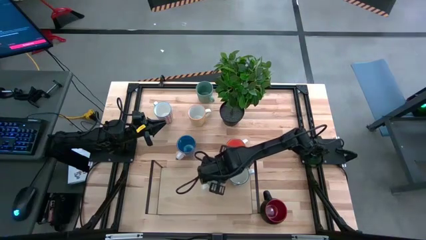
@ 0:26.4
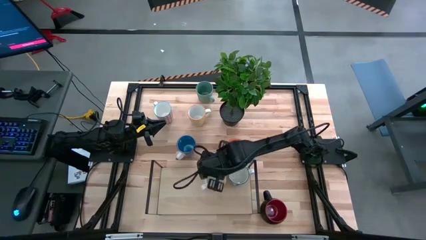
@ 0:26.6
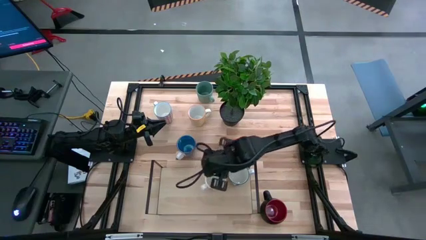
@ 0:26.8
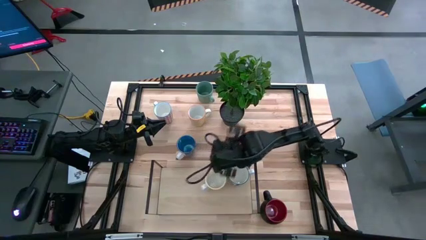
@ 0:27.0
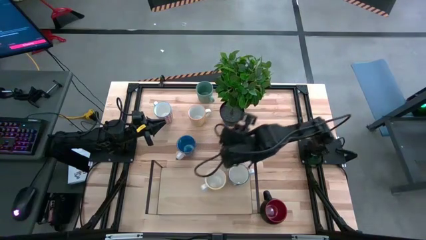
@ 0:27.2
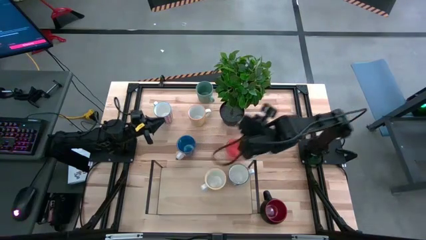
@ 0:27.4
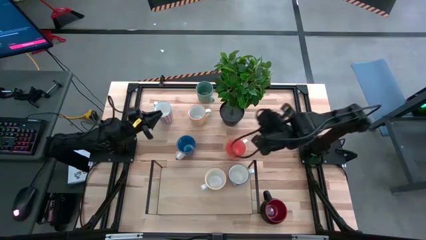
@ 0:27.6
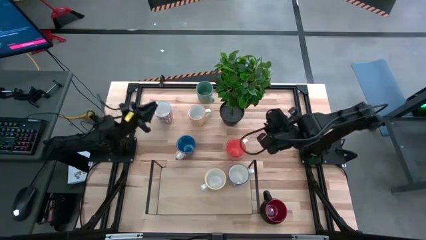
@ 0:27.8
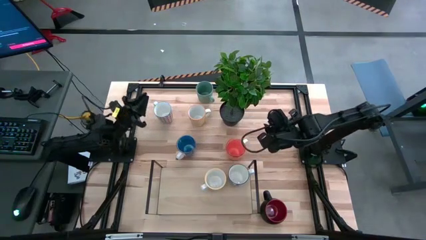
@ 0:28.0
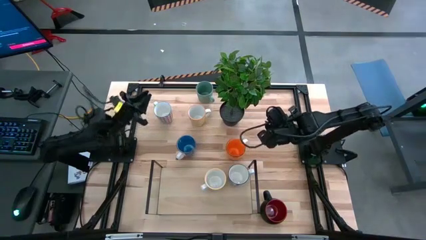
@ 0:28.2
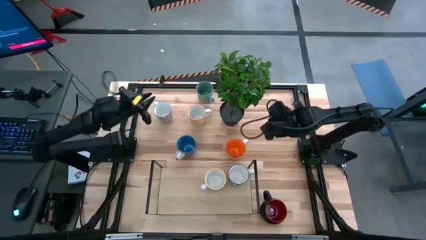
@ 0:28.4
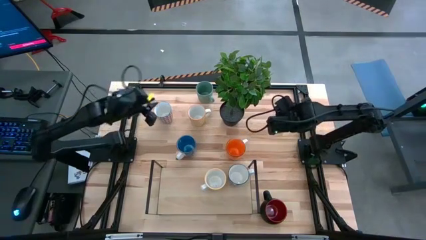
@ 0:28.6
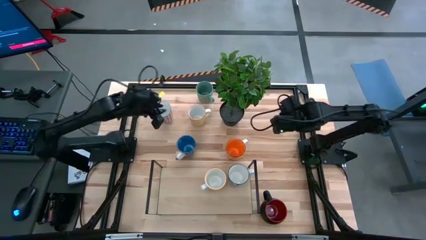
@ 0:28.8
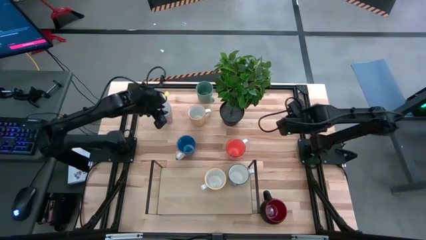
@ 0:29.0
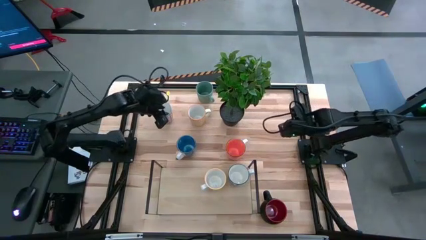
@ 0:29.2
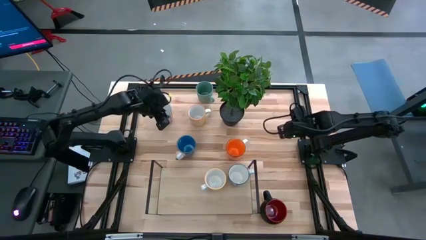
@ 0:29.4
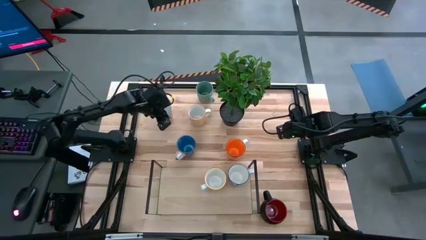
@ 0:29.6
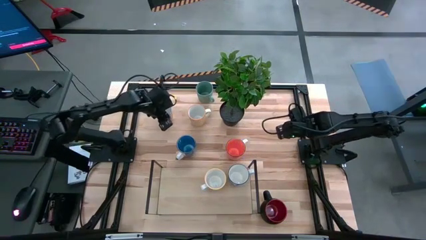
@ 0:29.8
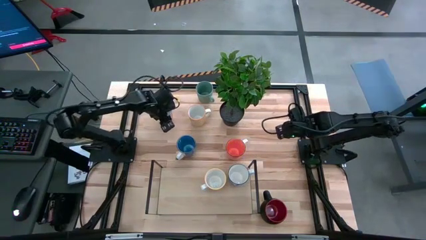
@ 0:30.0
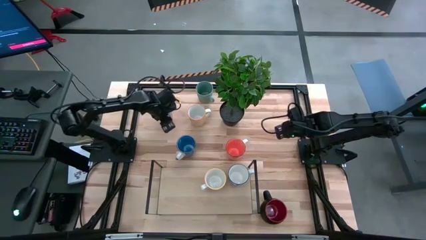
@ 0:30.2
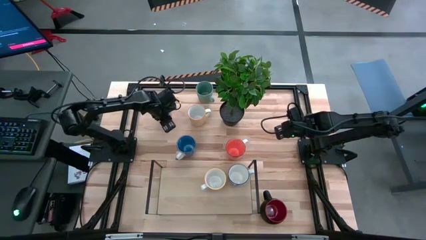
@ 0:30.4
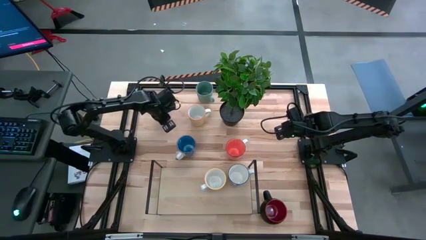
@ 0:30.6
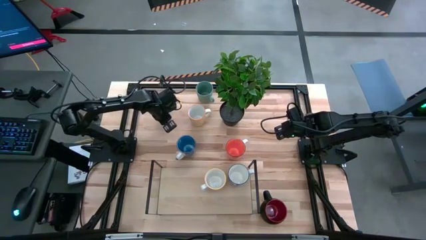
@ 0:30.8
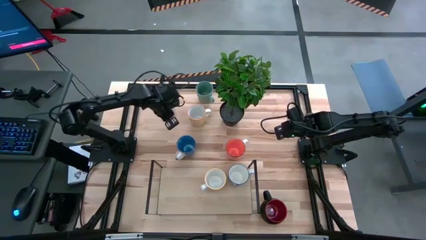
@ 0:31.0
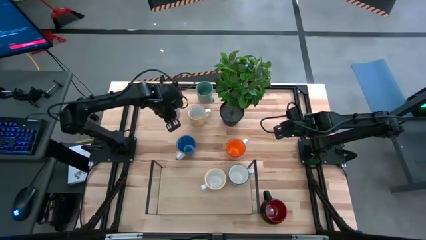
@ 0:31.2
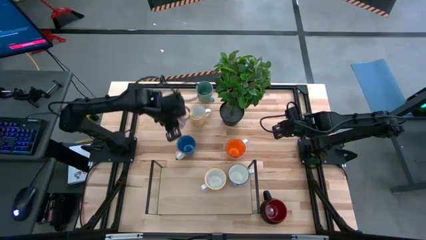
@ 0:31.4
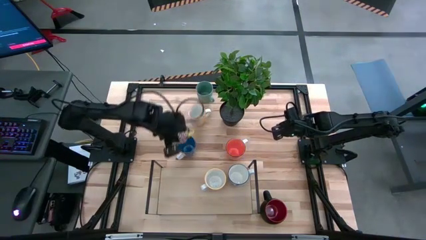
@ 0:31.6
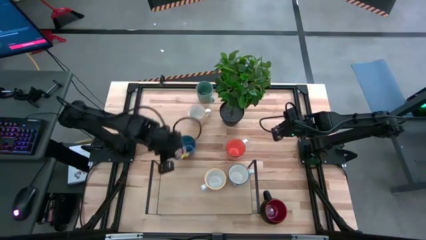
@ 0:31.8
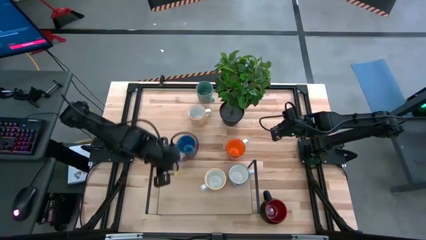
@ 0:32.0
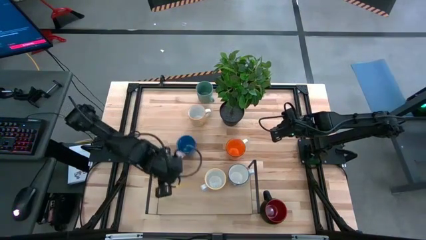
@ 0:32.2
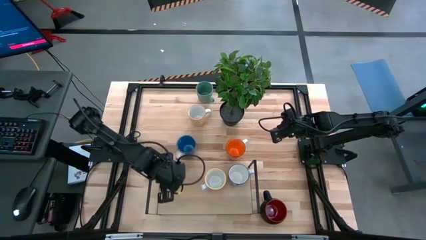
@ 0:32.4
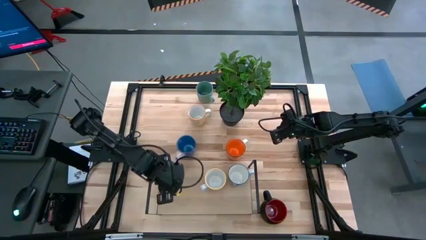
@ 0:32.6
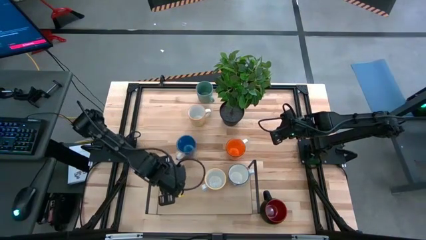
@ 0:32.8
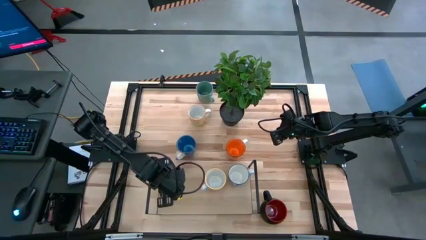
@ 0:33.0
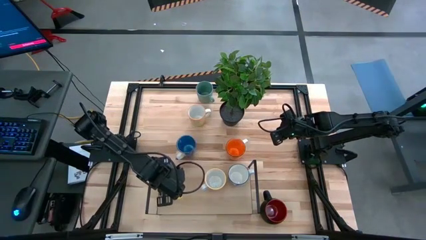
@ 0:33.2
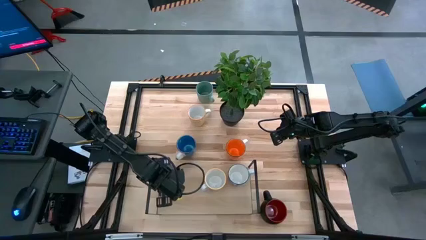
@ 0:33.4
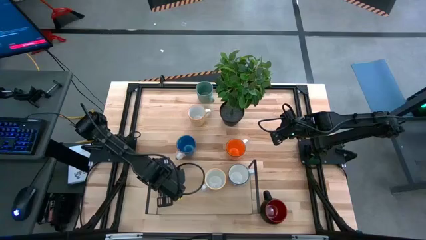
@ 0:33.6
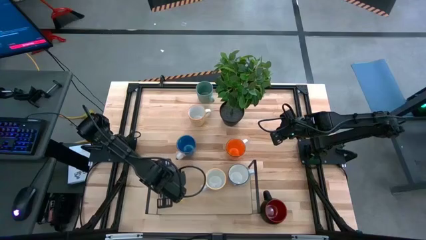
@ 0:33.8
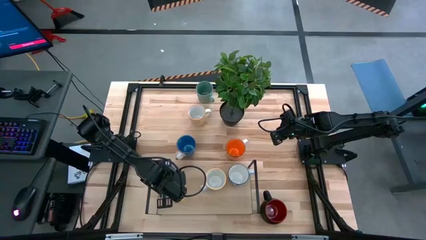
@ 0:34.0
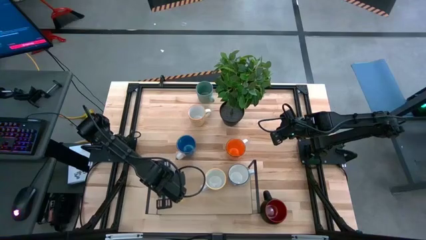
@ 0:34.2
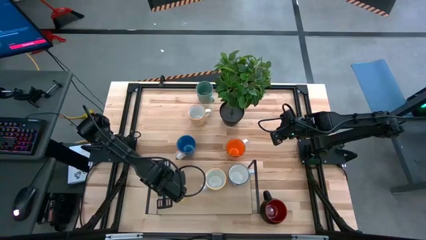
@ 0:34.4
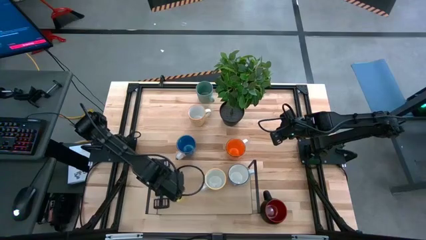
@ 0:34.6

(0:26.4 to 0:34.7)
Task: Place coffee mugs
Put the white-red pattern mug on the shelf

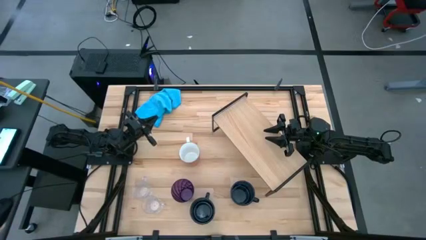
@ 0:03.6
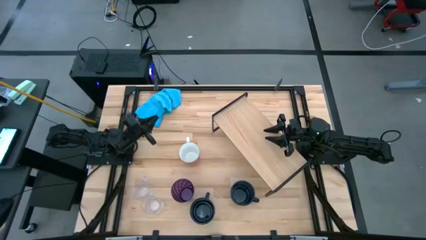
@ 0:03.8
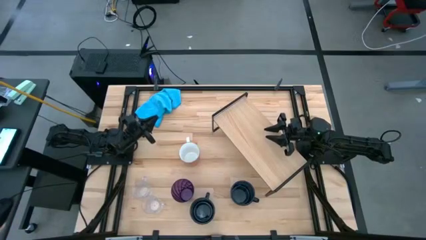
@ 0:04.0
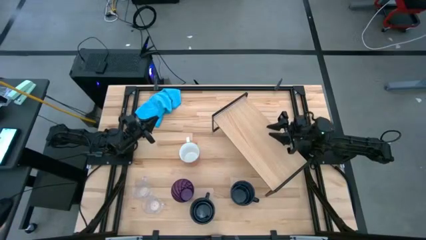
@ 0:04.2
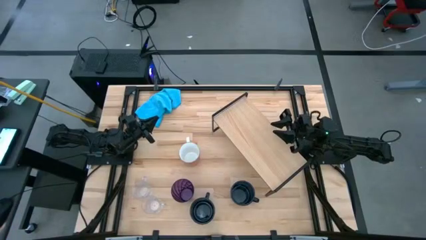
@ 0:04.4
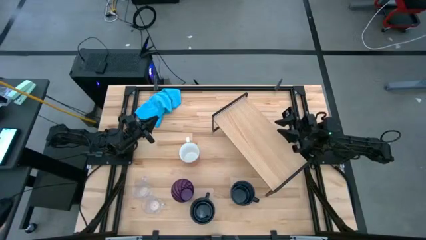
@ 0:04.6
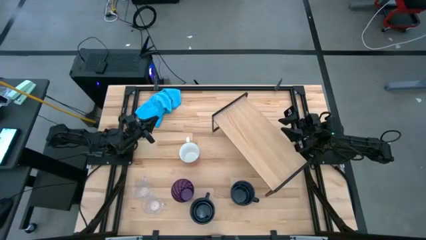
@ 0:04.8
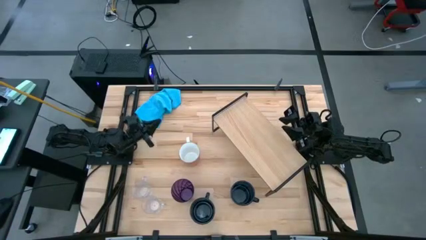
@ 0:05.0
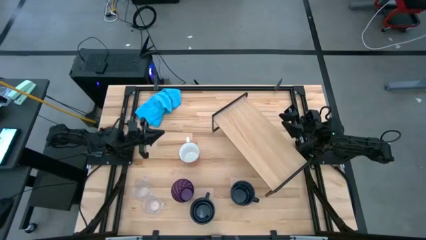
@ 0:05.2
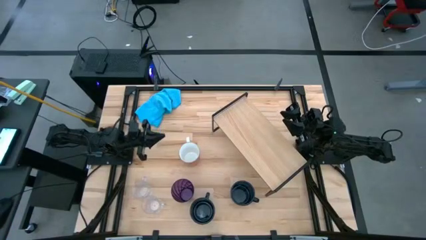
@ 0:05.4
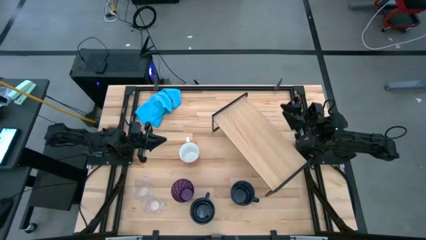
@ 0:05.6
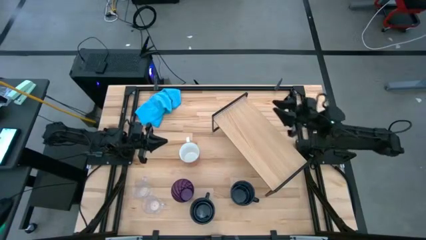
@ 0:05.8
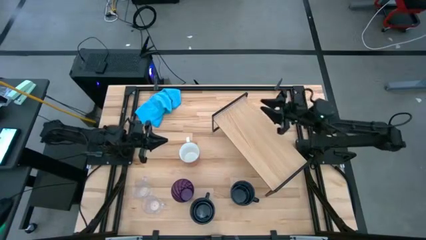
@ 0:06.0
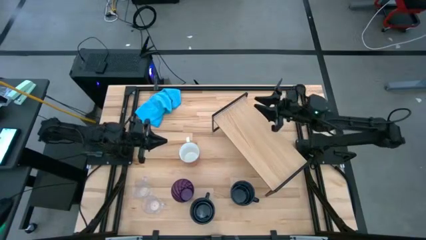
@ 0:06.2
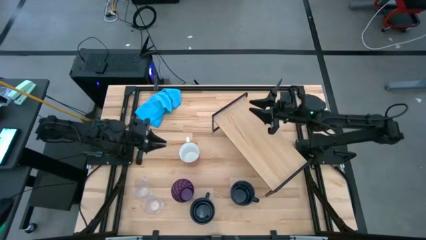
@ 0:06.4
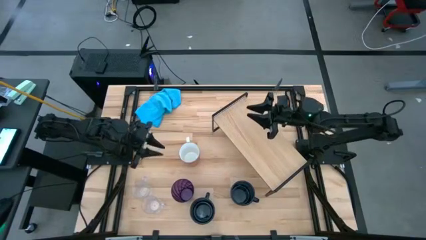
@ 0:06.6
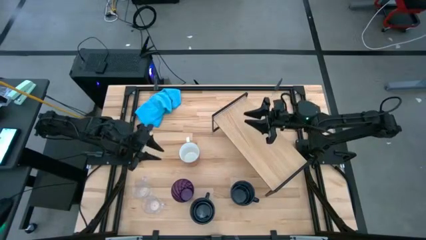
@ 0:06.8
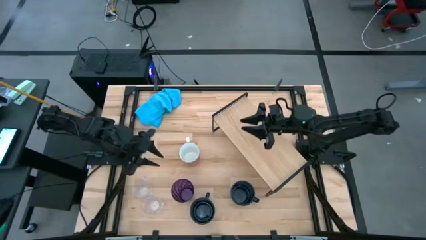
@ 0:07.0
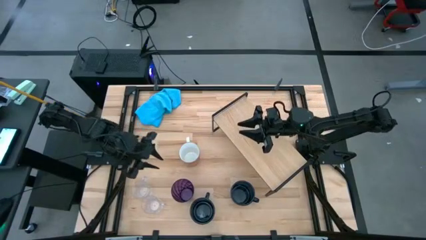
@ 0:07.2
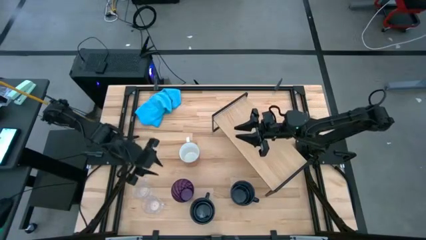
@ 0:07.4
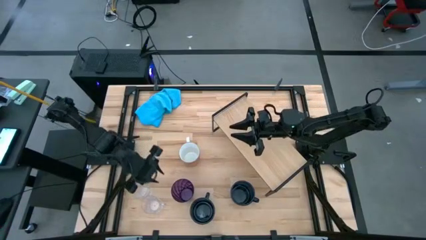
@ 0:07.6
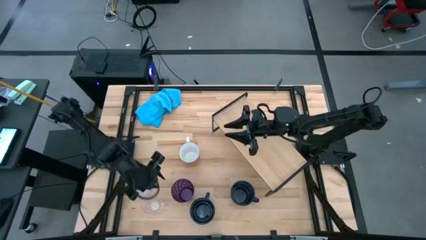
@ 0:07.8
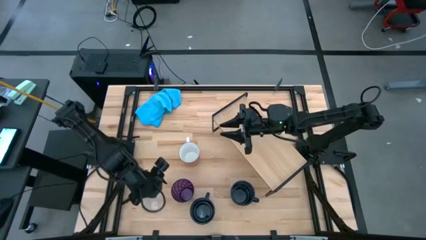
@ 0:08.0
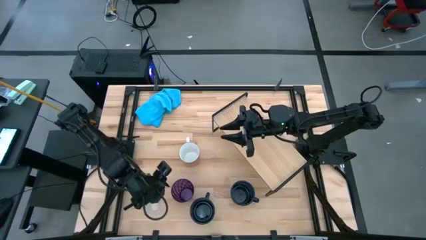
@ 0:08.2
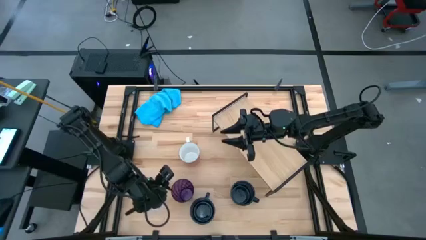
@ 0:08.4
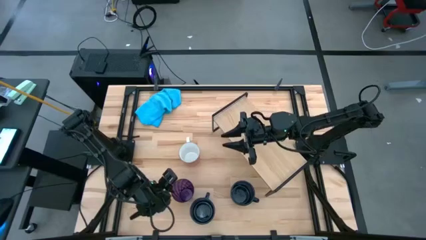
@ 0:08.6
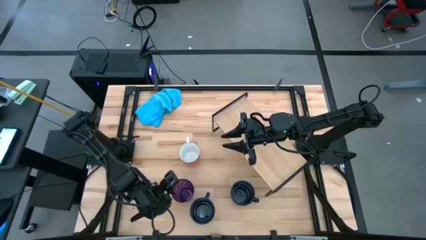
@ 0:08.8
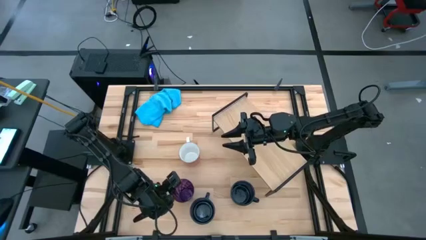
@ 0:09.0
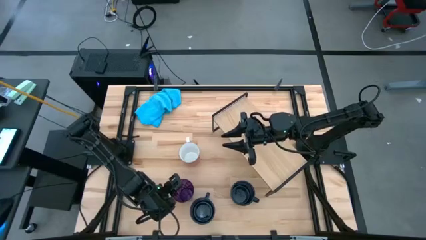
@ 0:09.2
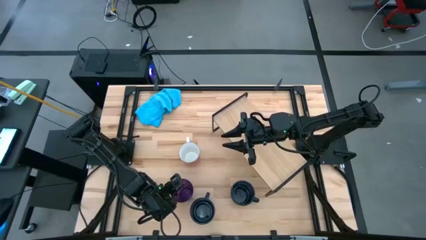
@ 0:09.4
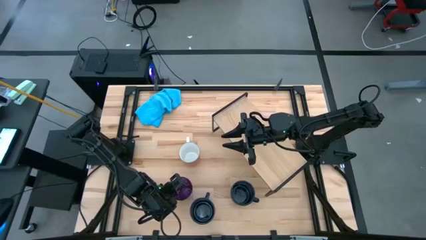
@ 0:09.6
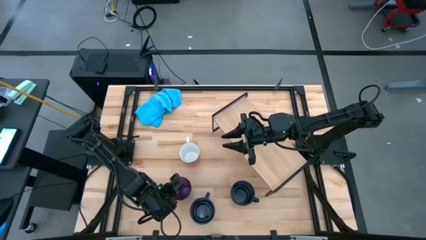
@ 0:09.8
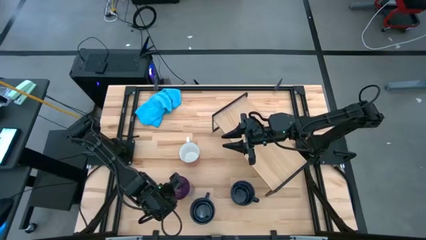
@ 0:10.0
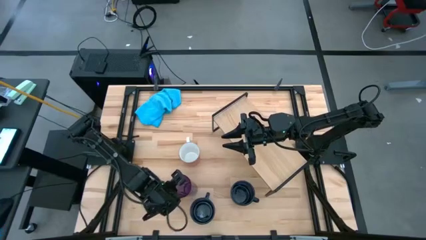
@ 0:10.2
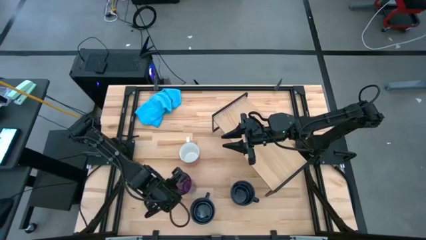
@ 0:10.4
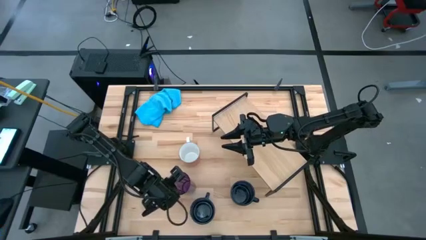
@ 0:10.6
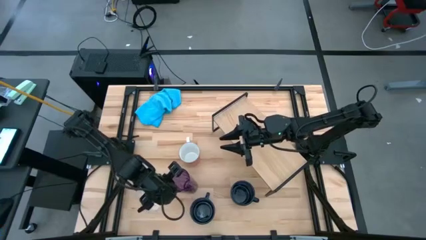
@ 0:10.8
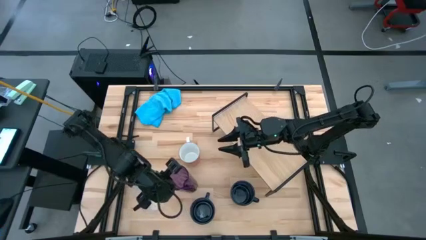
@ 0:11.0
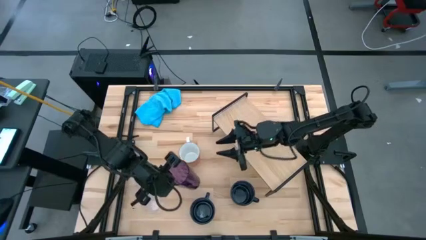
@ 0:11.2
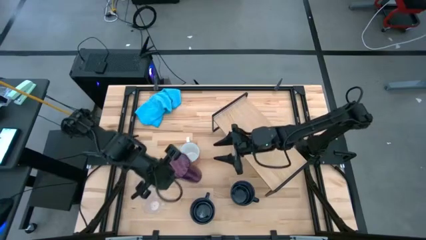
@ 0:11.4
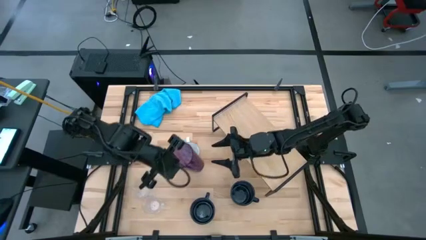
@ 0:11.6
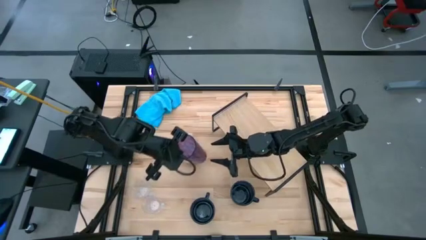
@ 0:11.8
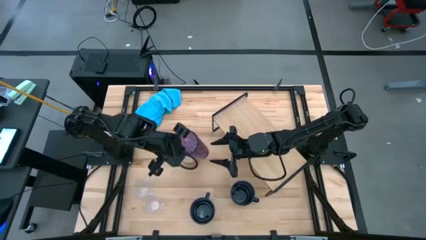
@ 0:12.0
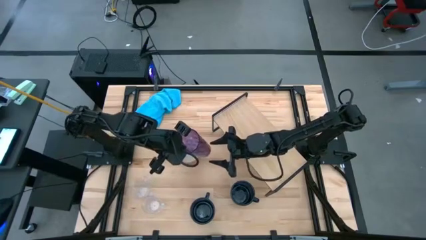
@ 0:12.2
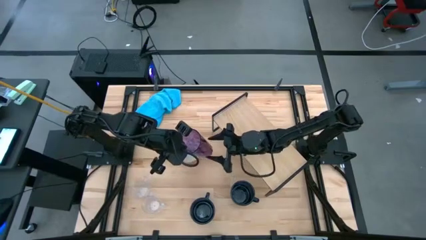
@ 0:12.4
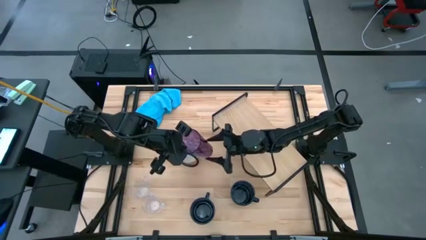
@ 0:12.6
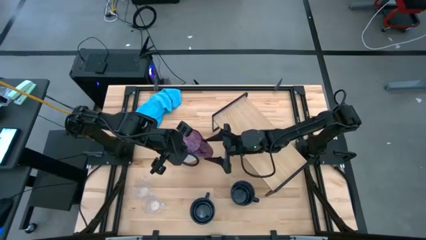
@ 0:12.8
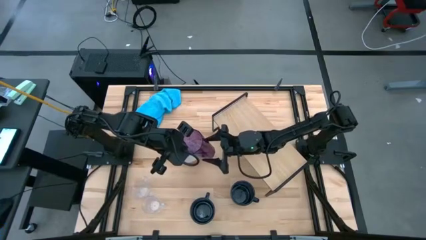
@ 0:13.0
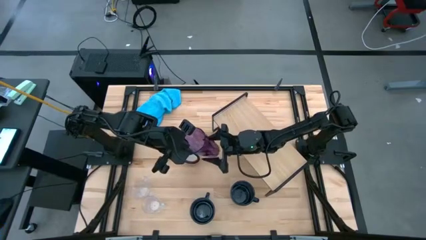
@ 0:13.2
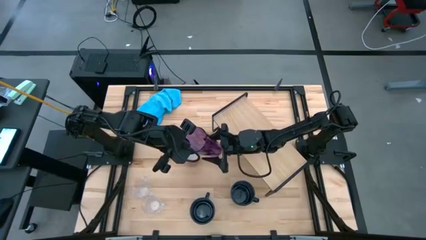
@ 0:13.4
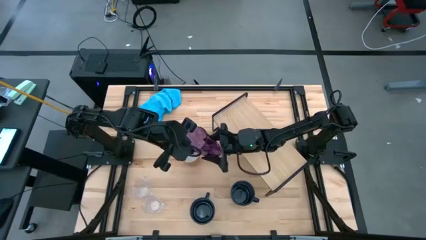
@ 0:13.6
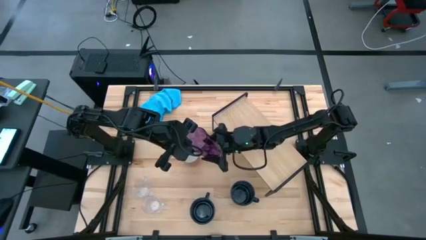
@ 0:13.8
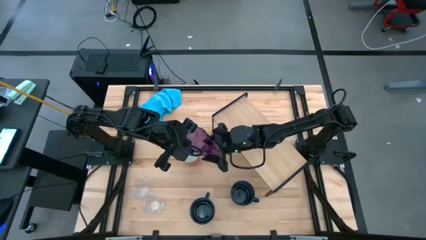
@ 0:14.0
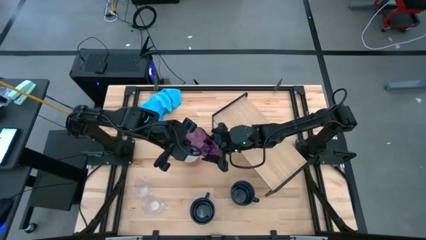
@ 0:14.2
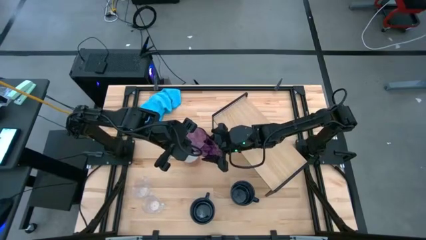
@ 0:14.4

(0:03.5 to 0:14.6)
Task: Stack small to large cups/mugs on shelf
Put the purple cup on the shelf
